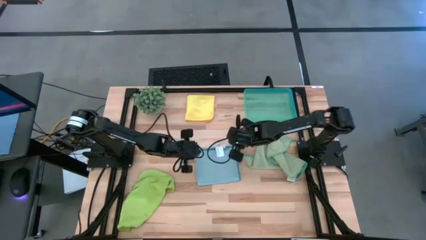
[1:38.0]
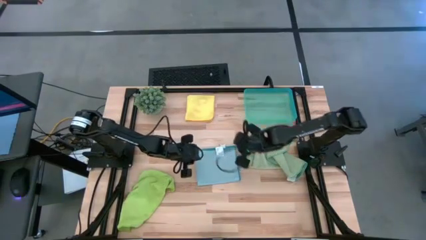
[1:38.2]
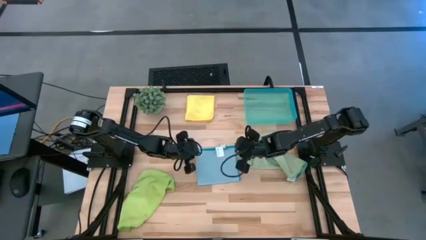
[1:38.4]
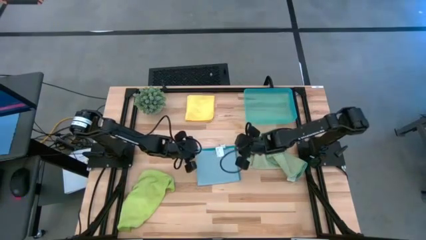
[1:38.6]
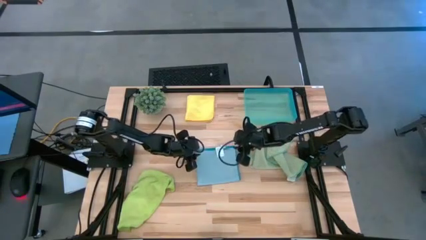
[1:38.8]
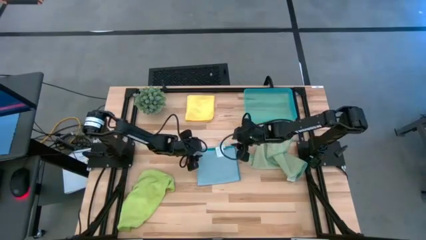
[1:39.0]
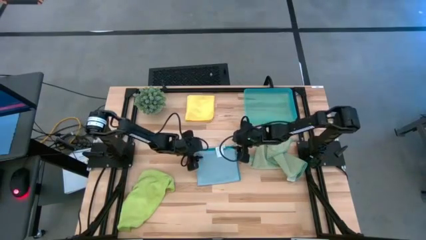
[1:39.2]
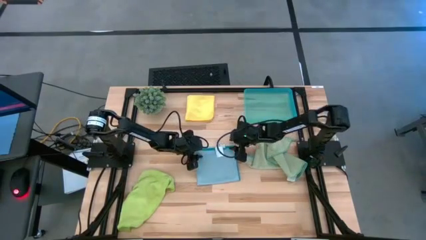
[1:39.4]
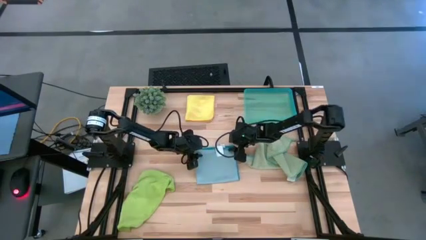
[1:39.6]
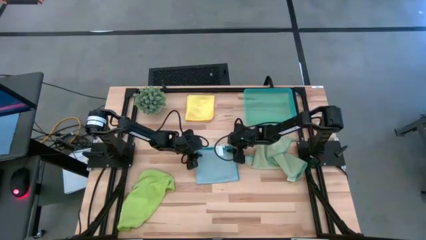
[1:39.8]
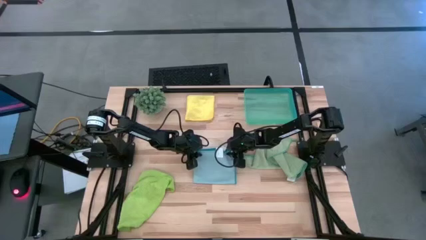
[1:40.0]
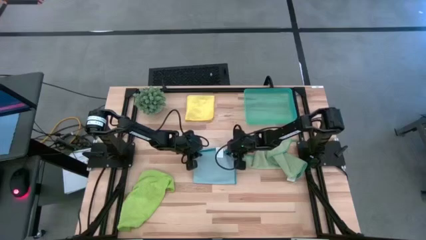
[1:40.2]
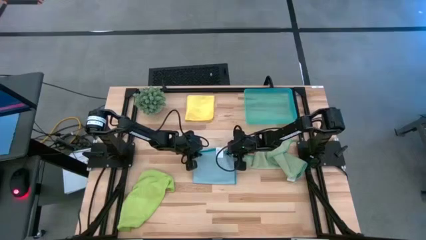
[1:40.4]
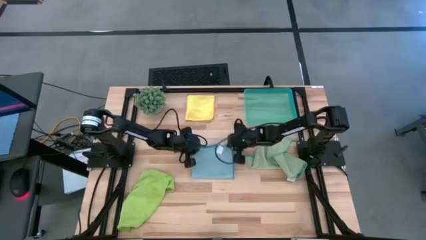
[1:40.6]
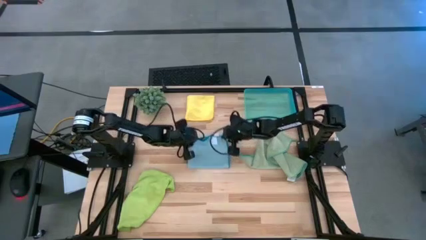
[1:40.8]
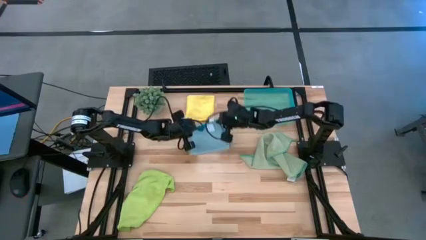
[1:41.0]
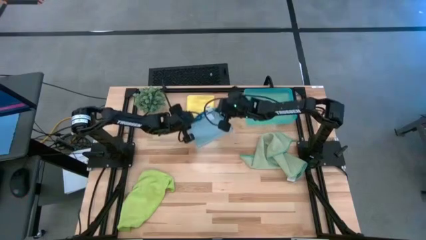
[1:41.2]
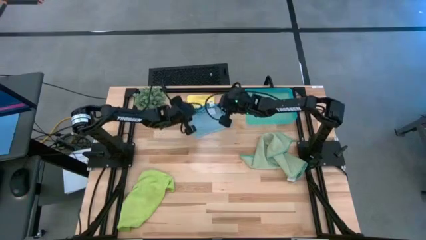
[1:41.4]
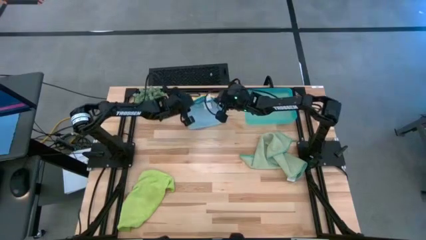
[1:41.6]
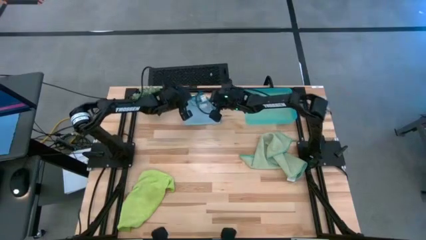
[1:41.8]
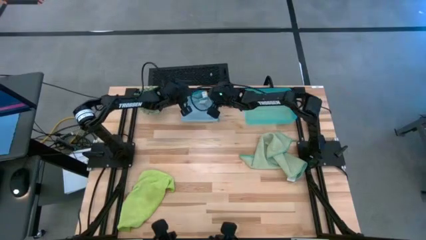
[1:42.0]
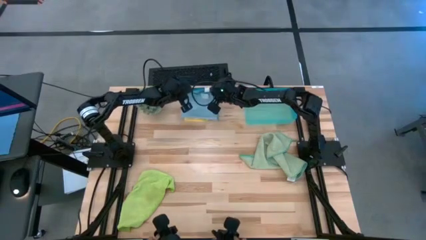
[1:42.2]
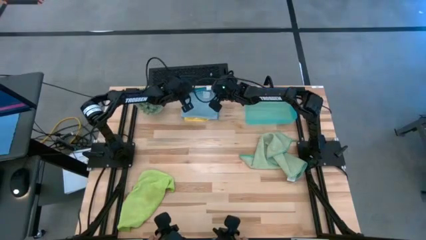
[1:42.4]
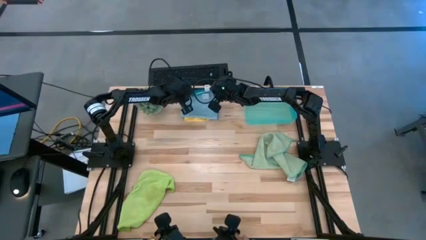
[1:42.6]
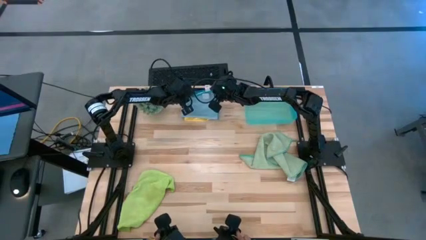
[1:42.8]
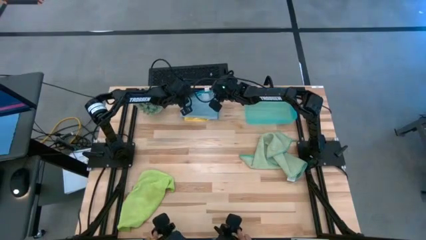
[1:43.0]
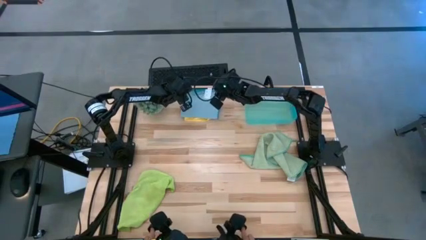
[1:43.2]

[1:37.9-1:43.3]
Task: Fold microfiber towels
Stack the blue microfiber cloth on top of the yellow microfiber cloth

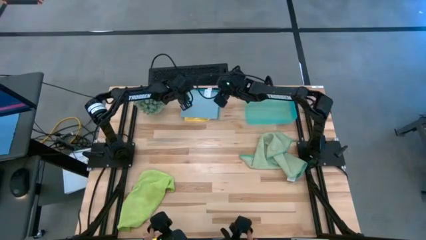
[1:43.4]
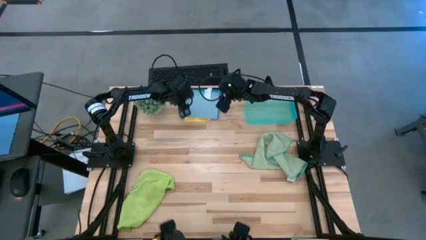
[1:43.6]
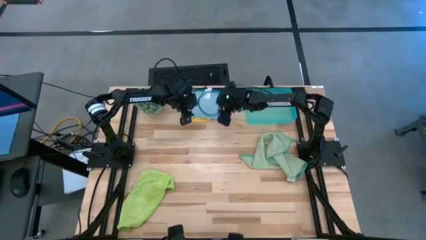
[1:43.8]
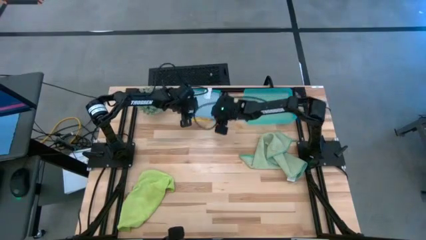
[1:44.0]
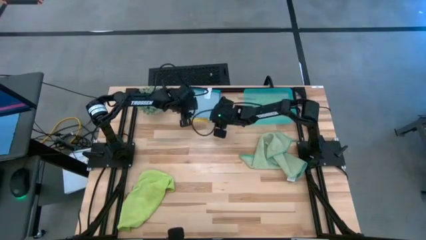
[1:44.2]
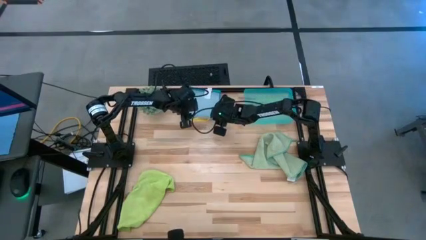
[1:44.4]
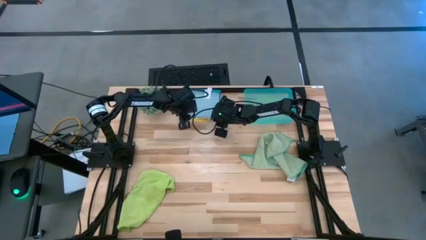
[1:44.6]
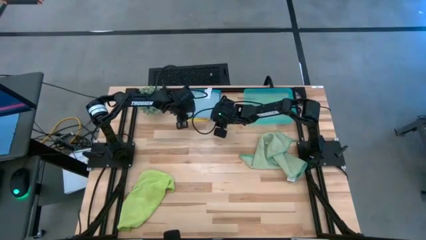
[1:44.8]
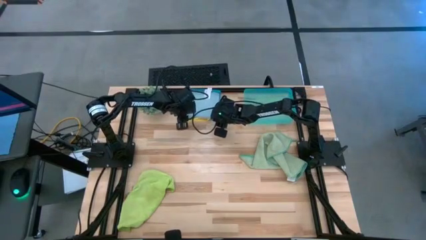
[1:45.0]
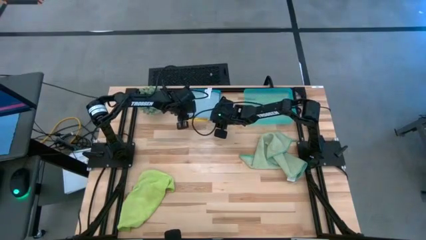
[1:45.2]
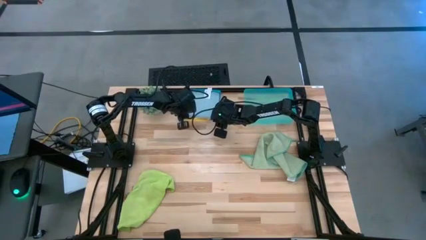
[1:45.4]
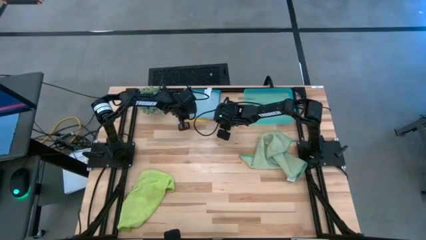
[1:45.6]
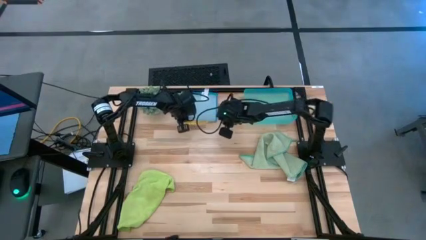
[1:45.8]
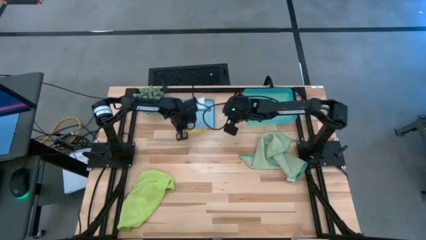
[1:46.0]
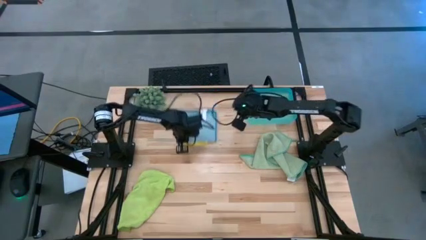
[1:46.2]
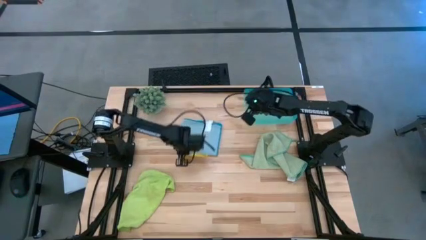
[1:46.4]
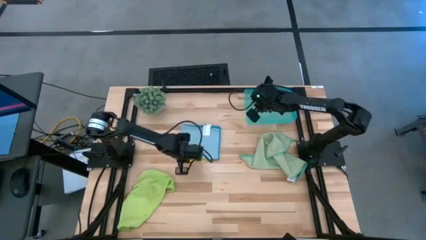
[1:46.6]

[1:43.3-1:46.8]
Adjust the stack of folded microfiber cloths

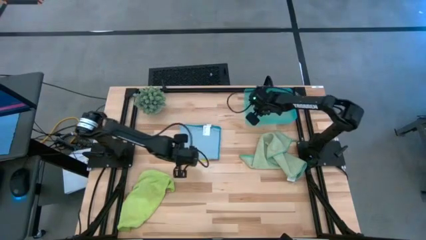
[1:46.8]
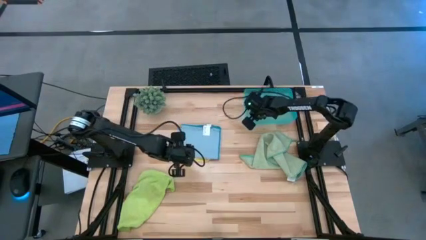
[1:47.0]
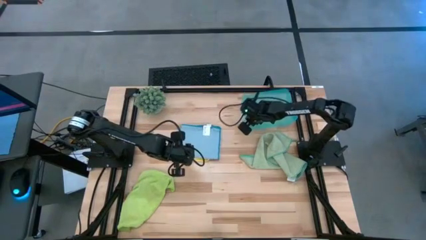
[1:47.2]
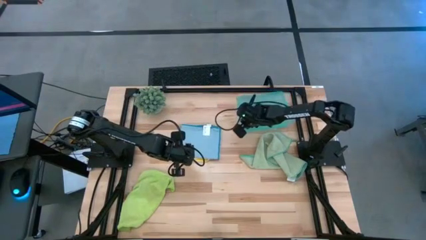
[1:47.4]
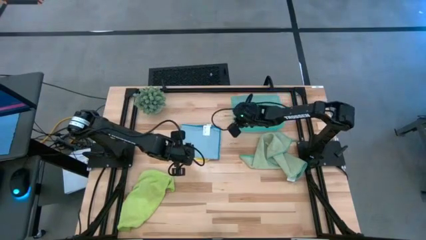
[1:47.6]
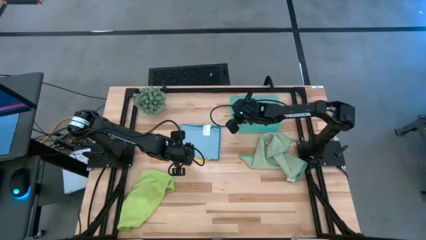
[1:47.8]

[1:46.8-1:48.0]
Adjust the blue bin

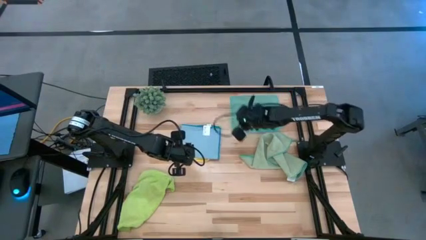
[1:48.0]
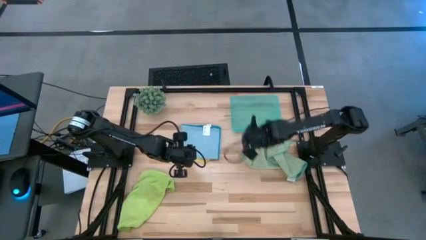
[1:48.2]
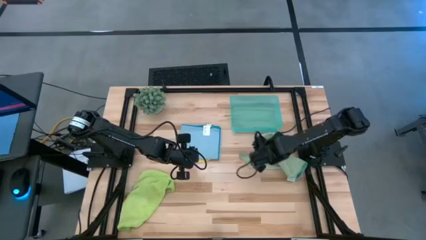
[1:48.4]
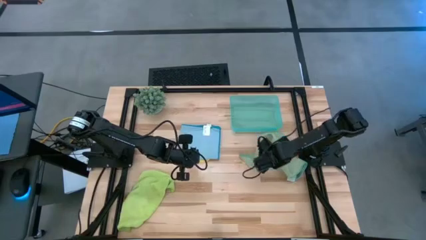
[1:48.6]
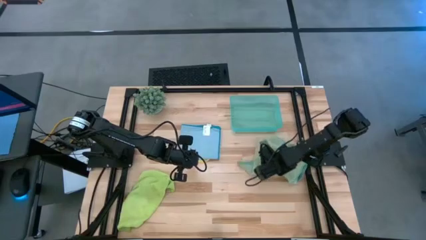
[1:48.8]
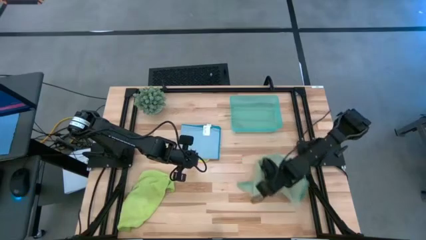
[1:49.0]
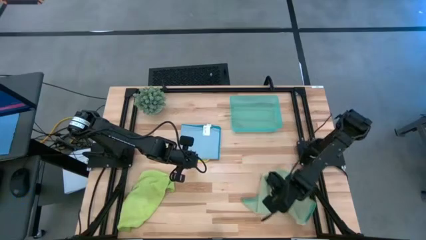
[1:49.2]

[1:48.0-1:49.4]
Adjust the light green microfiber cloth

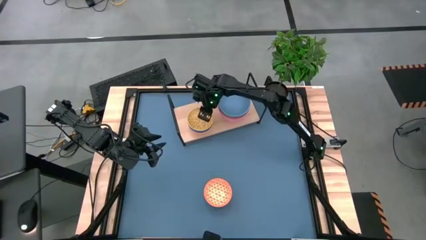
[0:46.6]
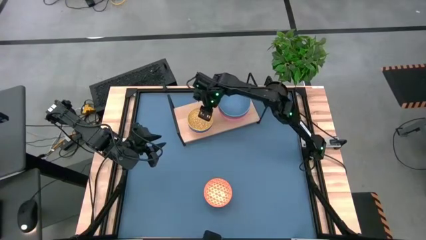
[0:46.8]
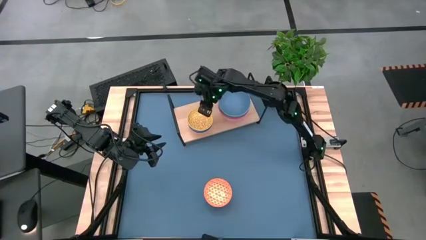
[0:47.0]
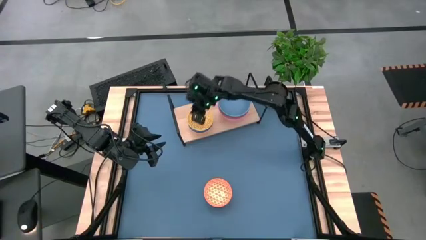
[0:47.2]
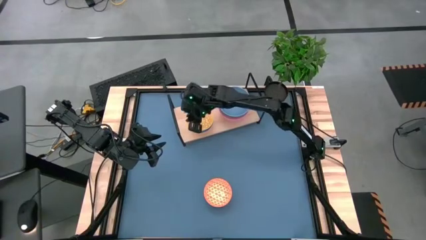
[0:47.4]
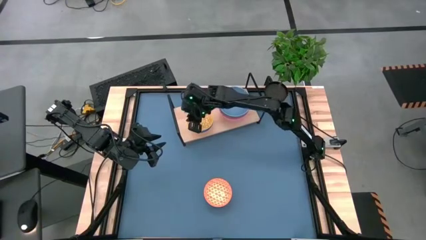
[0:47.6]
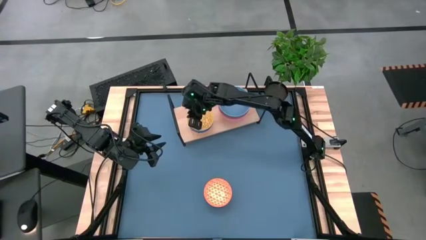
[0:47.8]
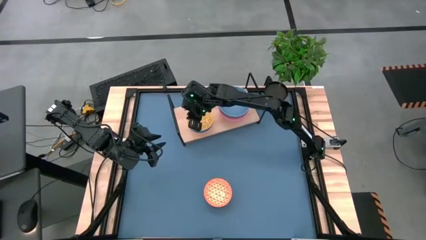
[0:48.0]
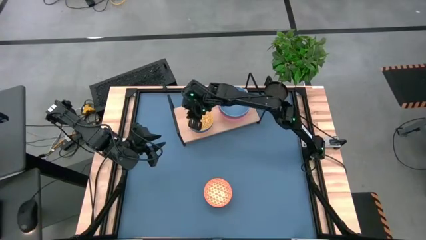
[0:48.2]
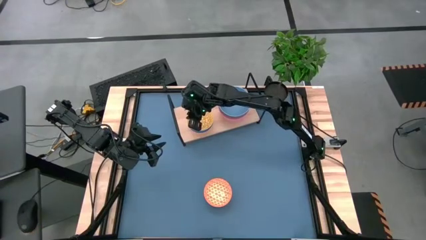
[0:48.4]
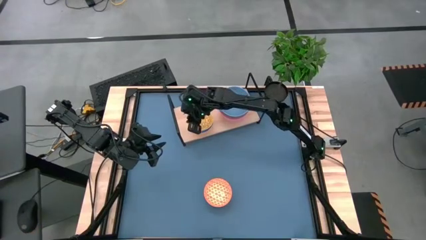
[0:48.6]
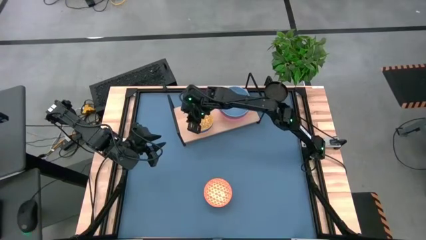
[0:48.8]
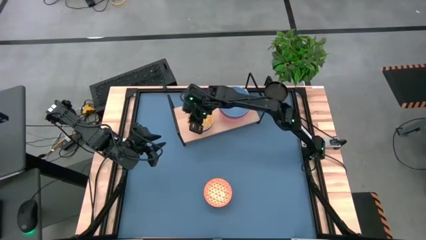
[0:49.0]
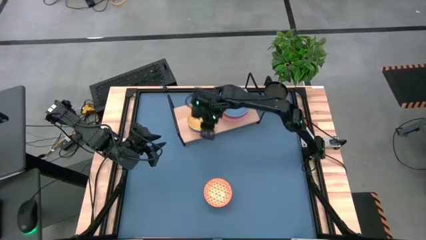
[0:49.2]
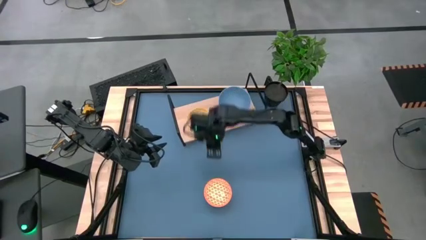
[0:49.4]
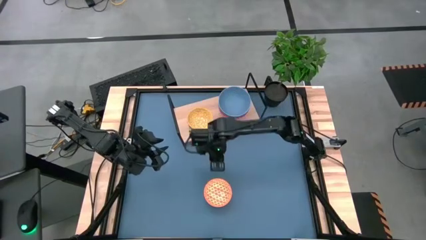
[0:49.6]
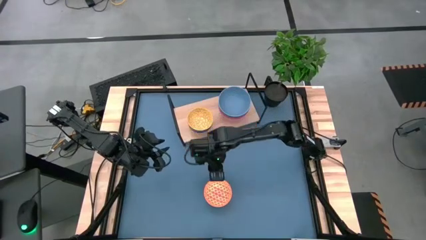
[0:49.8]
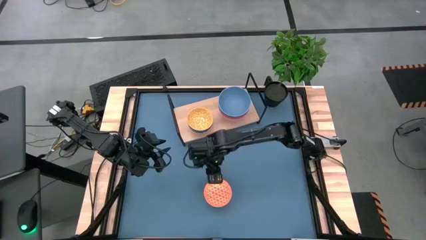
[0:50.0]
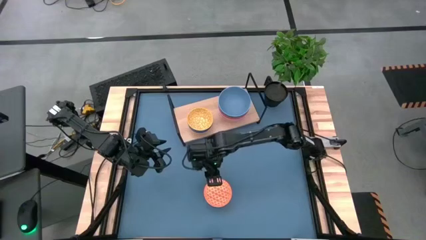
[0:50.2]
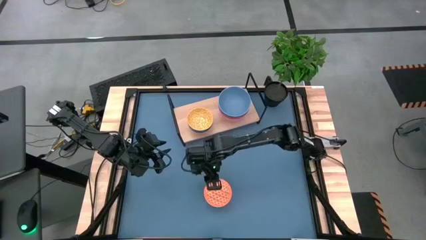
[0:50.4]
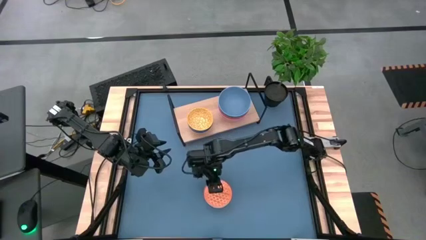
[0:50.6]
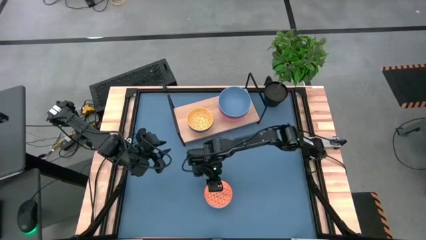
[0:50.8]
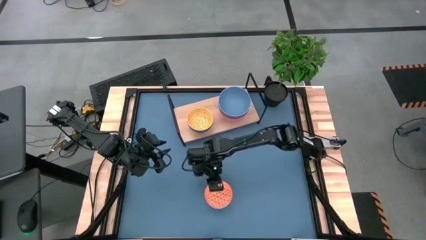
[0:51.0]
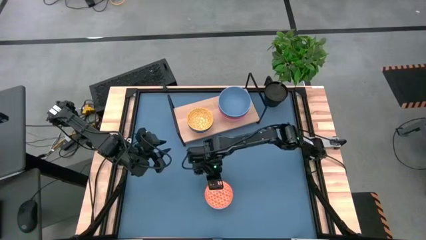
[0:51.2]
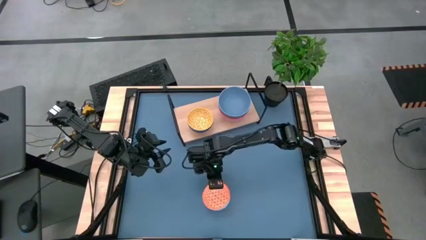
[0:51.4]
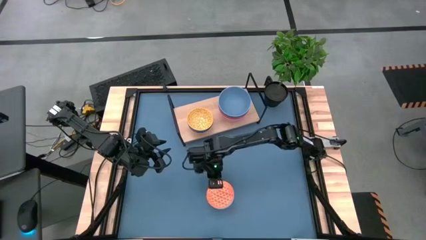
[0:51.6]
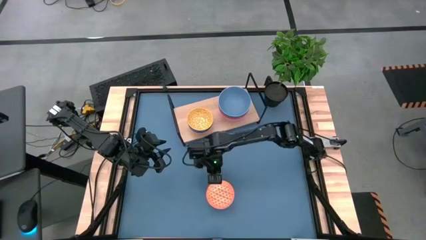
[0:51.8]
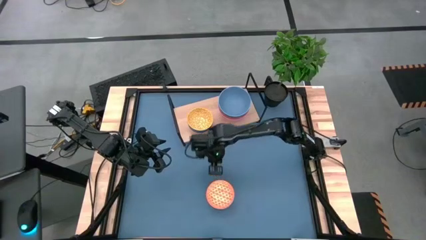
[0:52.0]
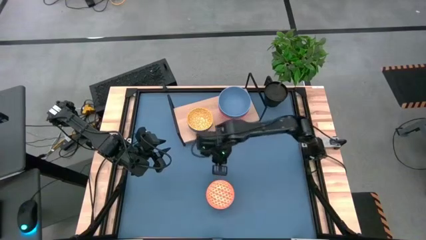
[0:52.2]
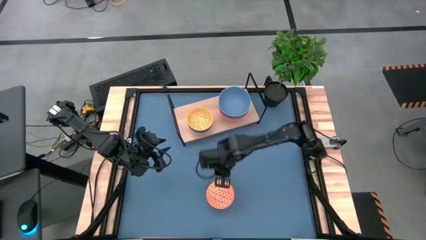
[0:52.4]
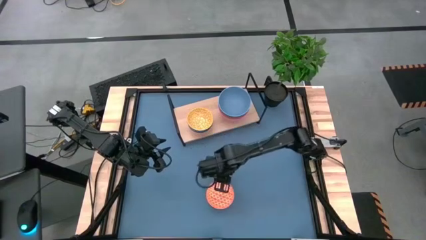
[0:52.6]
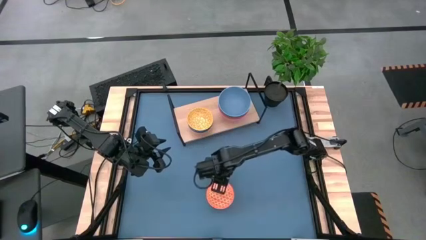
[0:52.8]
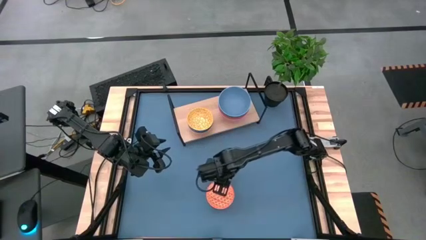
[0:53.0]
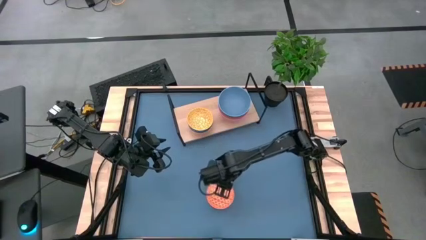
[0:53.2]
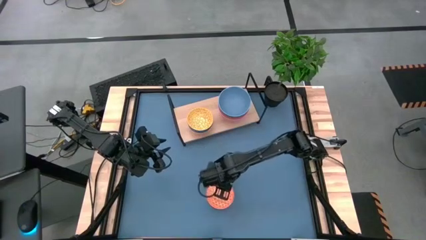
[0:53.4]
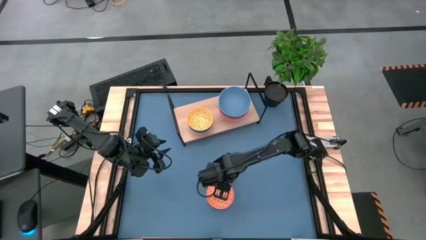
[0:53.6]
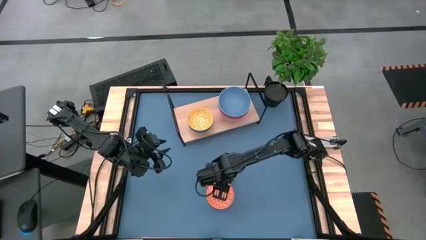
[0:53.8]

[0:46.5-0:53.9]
Task: Place and stack bowls onto a shelf
Stack the orange bowl on top of the yellow bowl on the shelf
